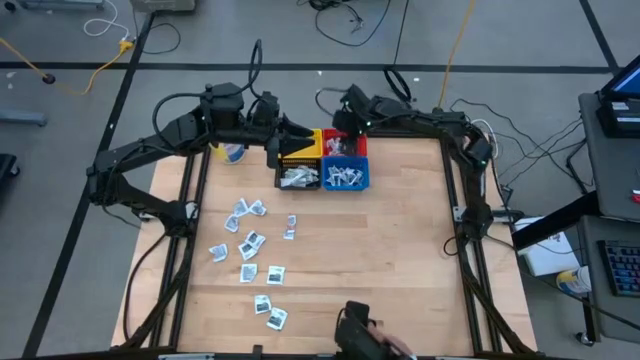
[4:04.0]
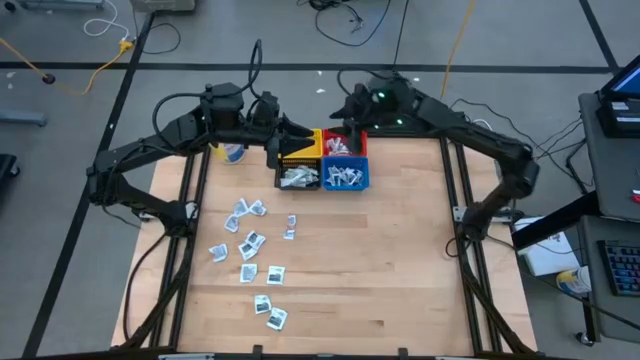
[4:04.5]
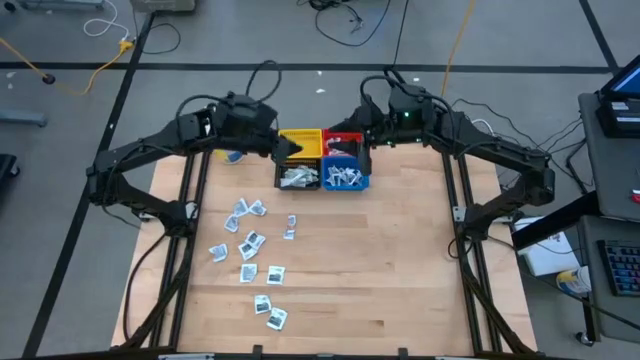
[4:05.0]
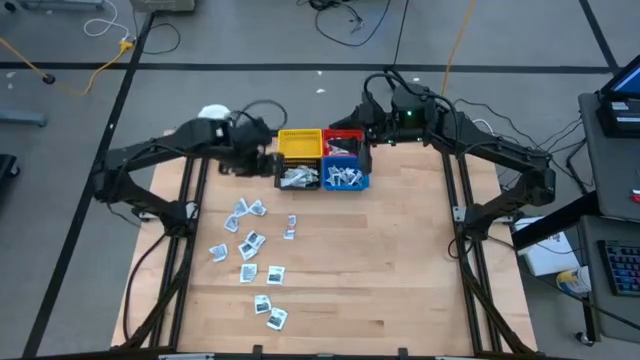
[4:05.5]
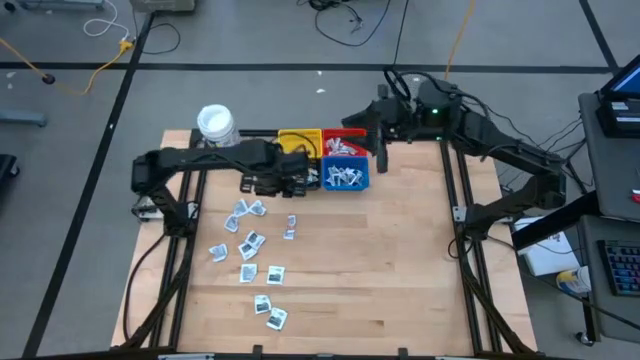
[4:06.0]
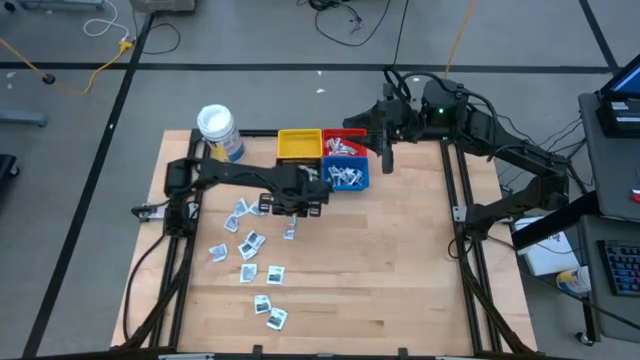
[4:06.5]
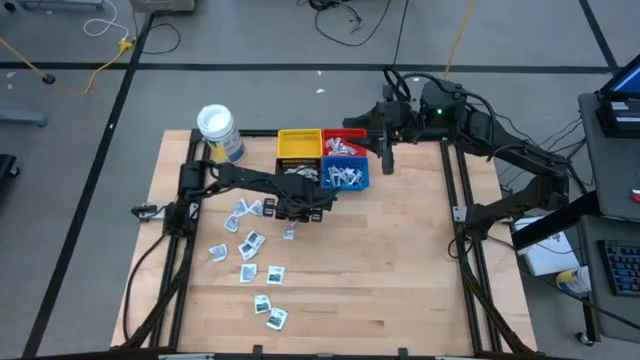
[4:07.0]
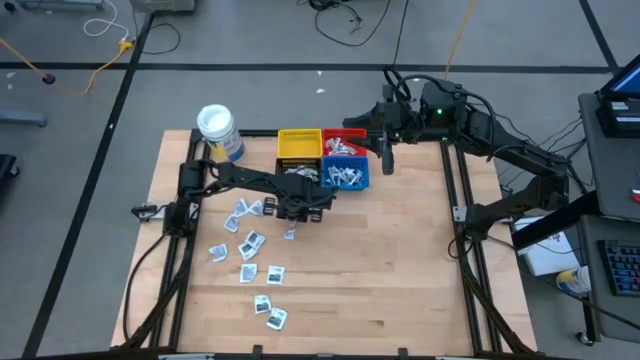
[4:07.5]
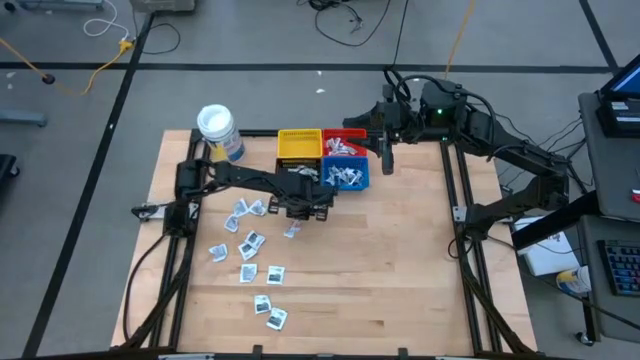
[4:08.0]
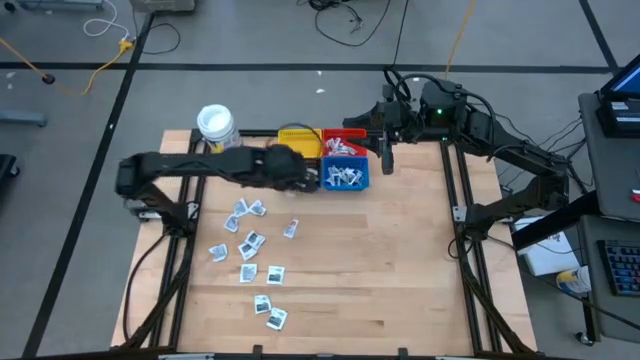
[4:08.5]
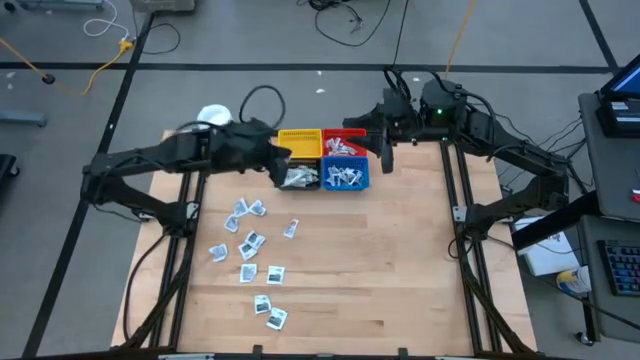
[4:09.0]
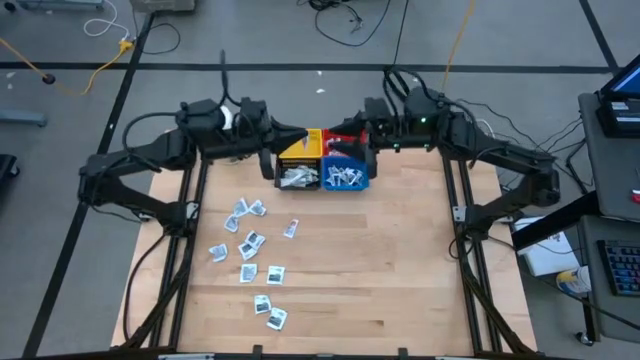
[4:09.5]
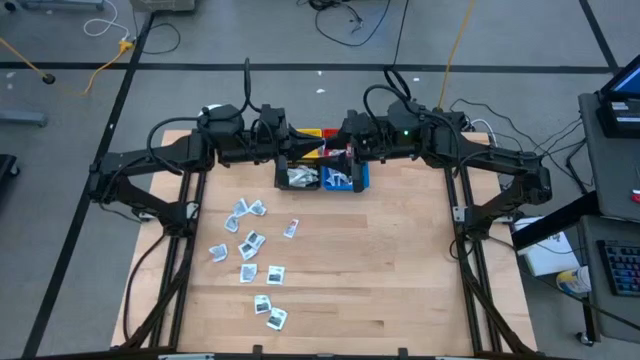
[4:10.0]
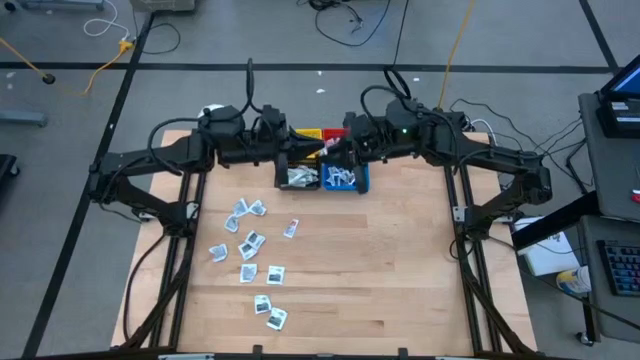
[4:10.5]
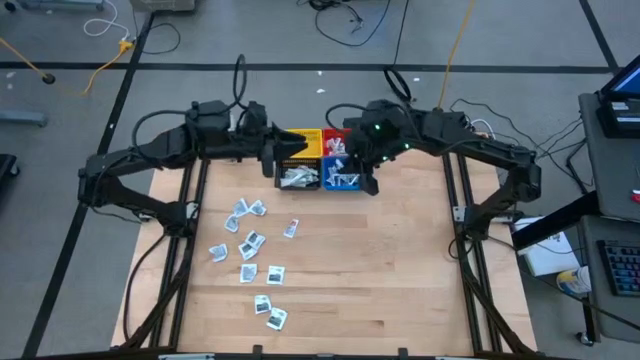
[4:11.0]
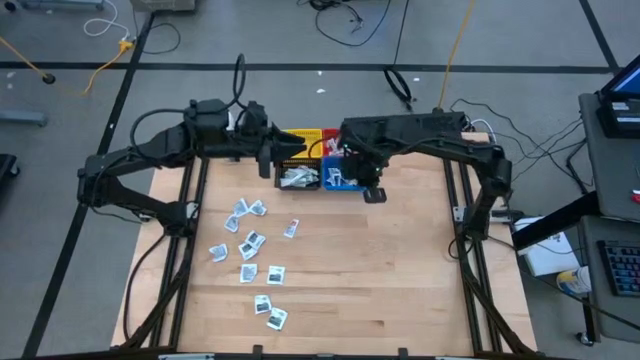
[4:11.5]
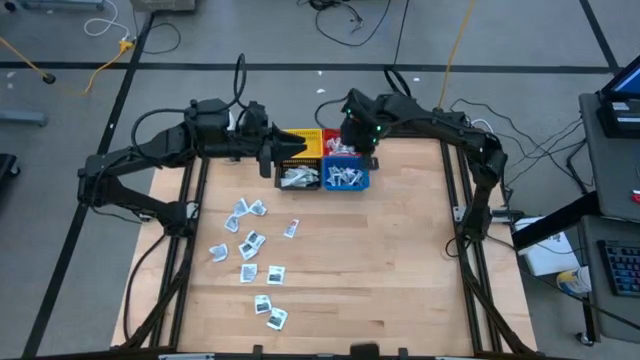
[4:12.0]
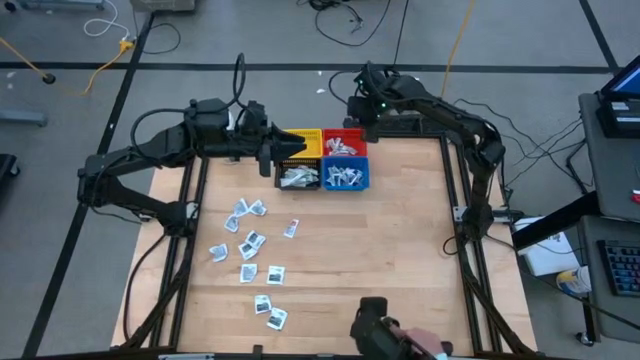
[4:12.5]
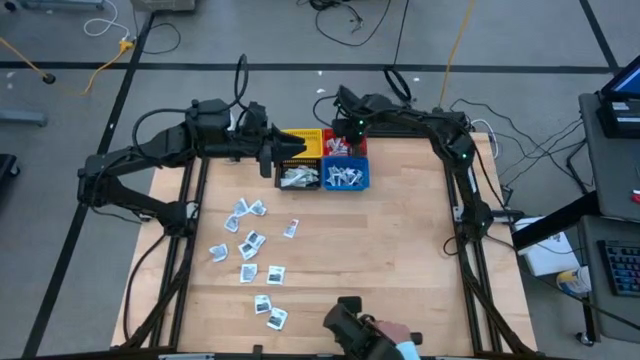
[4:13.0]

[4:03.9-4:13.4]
Task: Pick & Place First Aid Supplies
Put the orange ointment pack into the red basket

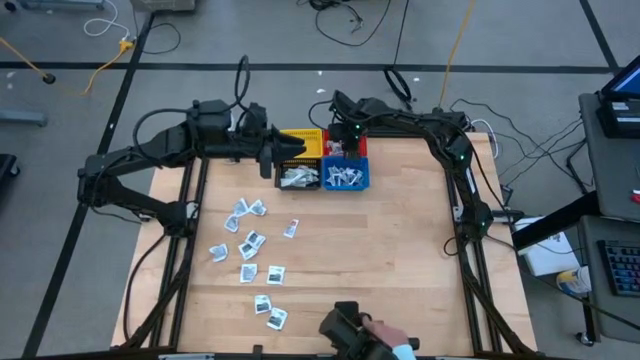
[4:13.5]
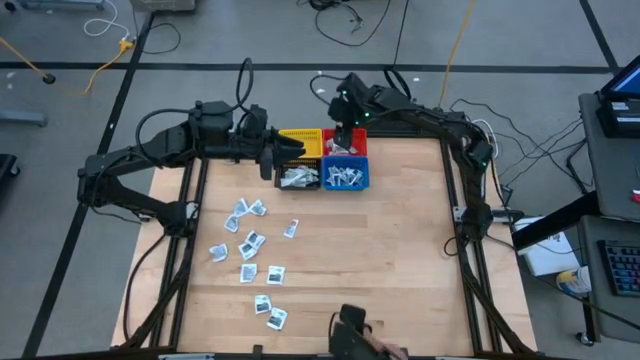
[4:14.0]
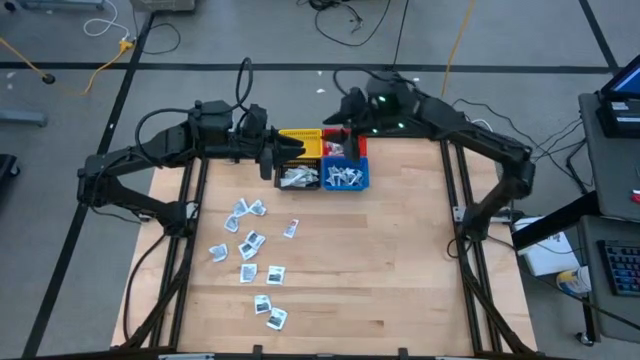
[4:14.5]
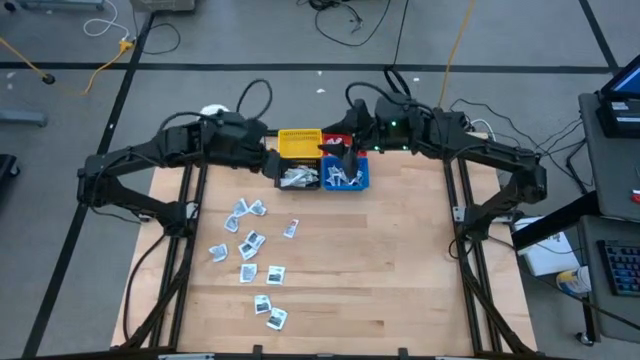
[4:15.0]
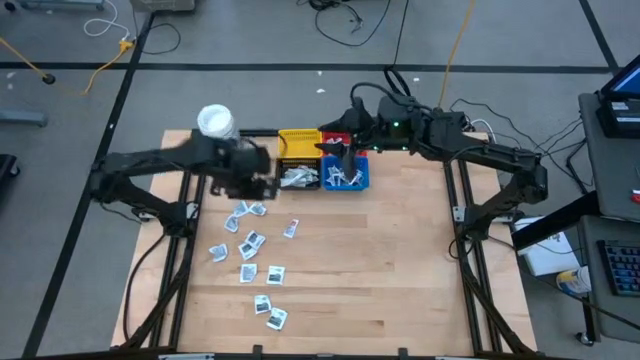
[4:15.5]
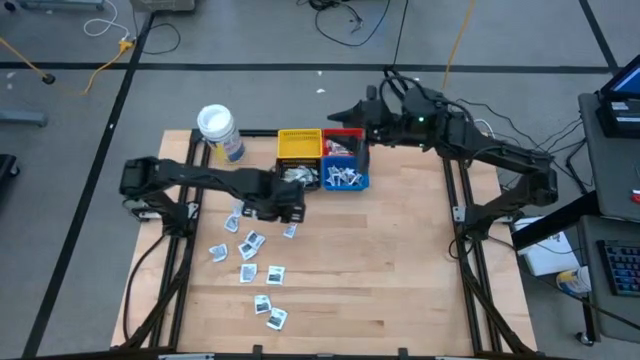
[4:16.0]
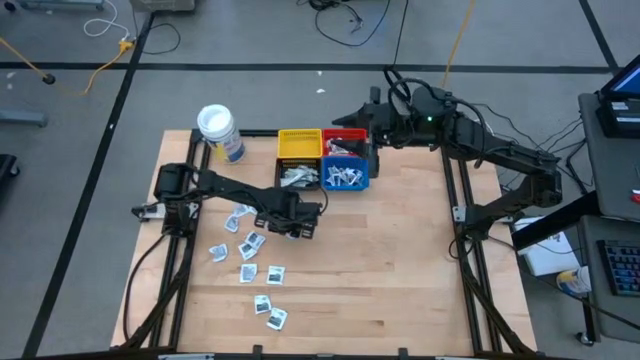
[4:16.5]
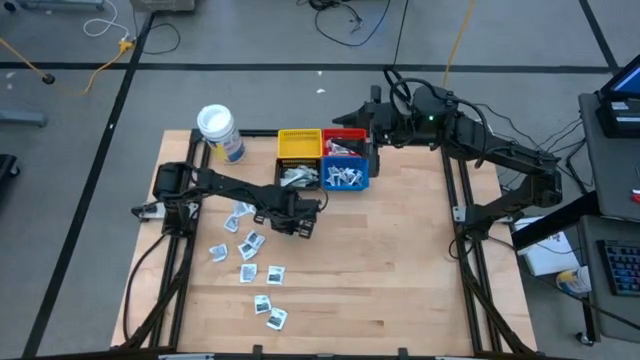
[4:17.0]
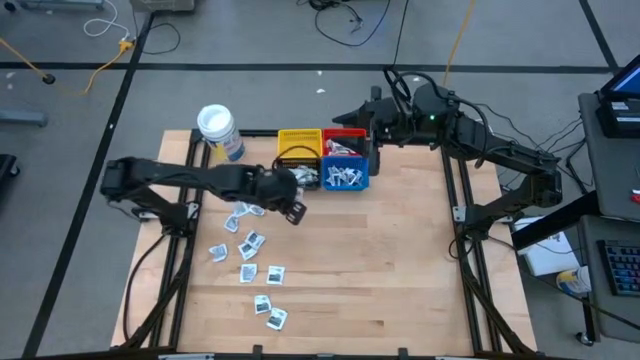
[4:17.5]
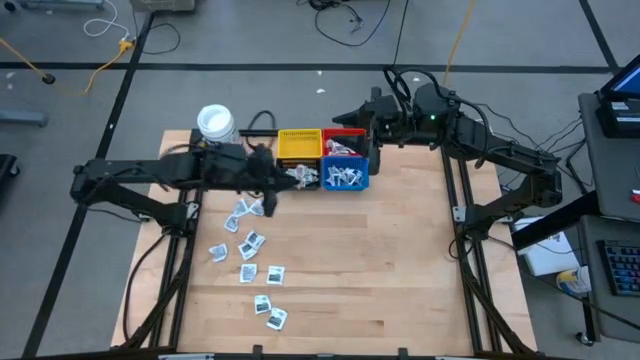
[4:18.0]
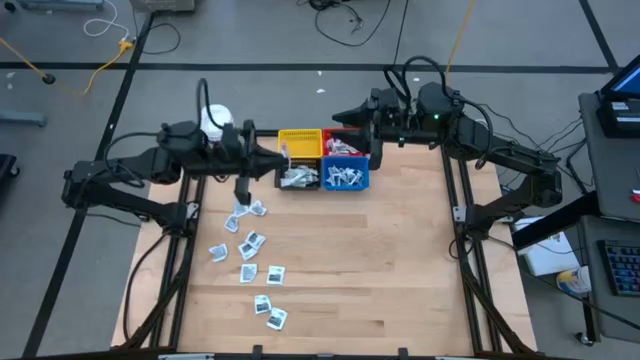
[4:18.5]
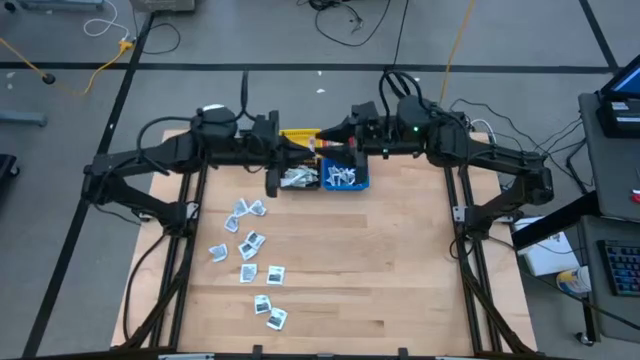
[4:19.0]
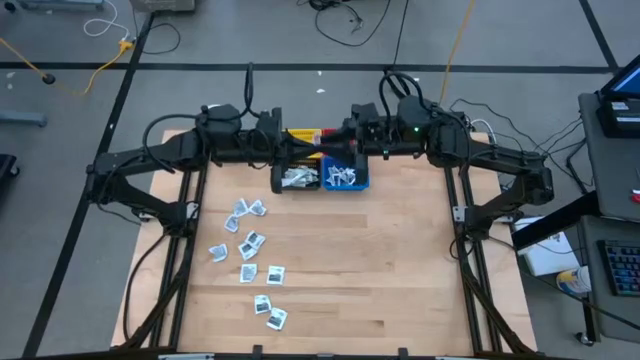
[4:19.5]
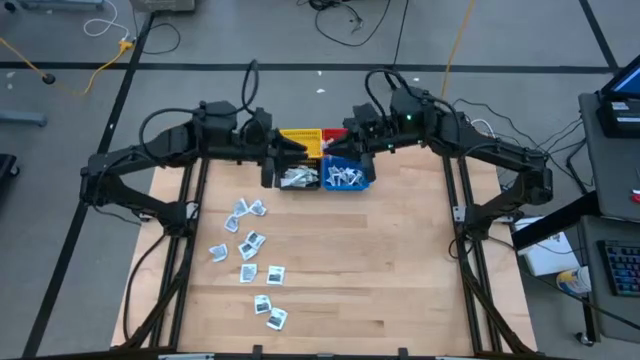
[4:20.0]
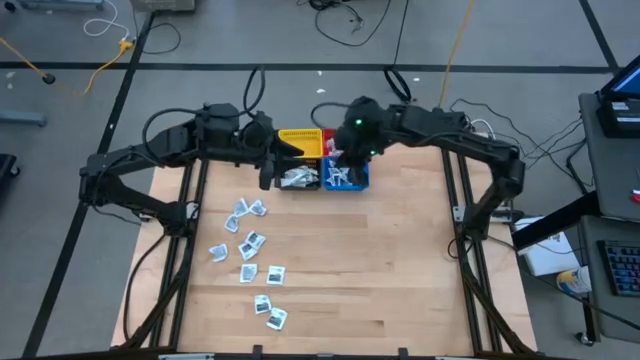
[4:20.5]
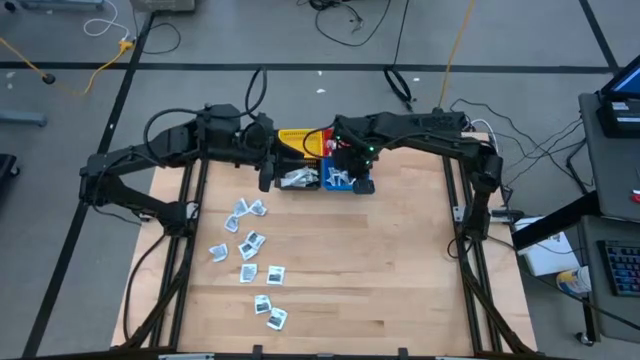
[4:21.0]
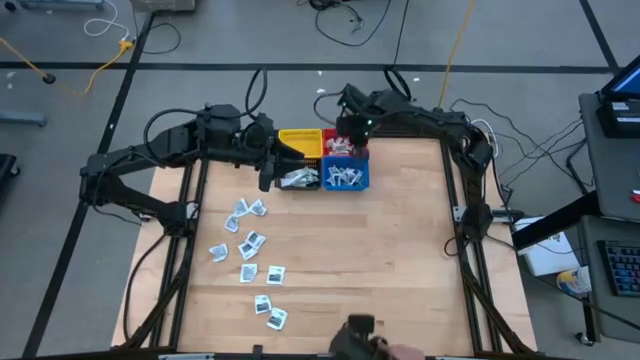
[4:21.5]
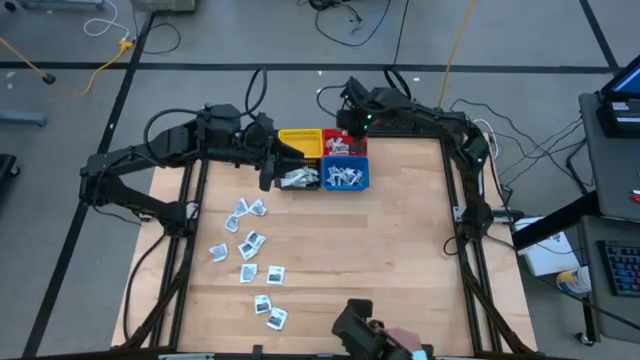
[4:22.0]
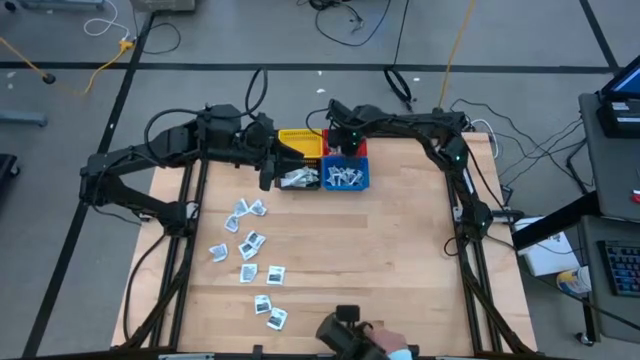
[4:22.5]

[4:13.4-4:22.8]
Put the orange ointment pack into the red basket

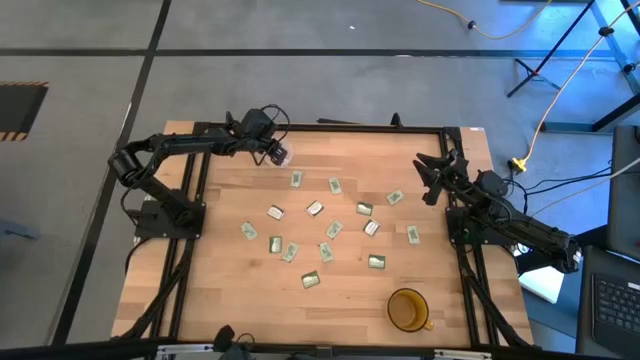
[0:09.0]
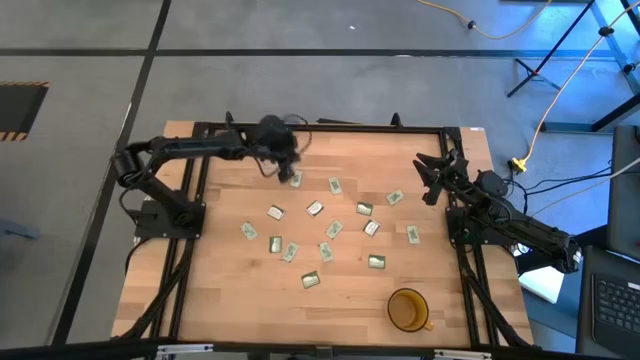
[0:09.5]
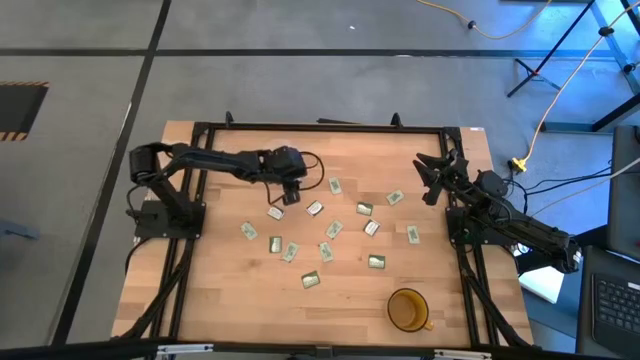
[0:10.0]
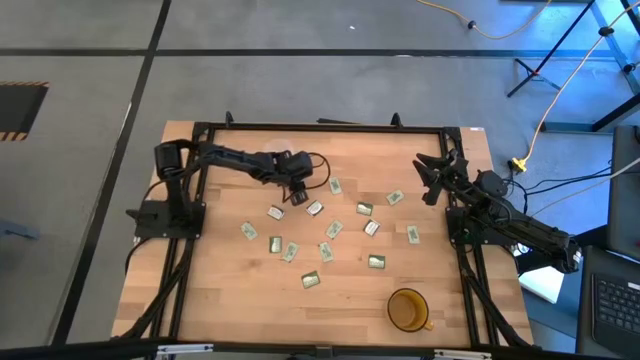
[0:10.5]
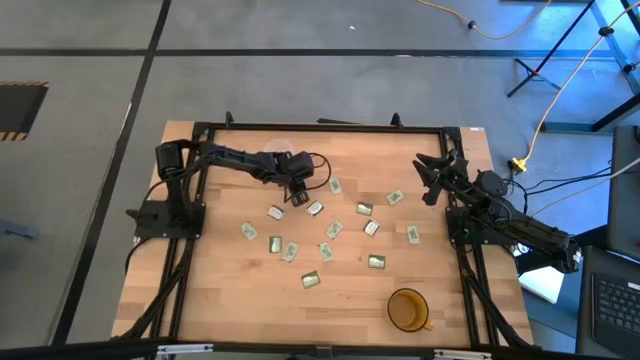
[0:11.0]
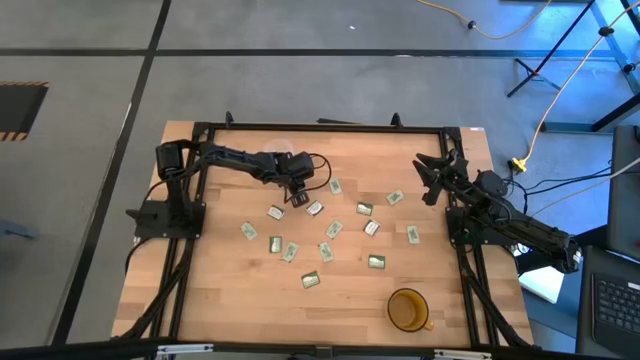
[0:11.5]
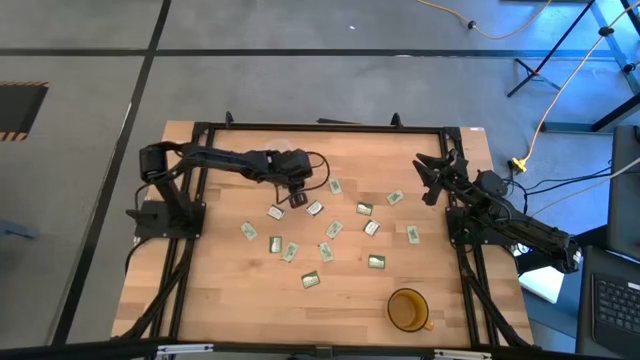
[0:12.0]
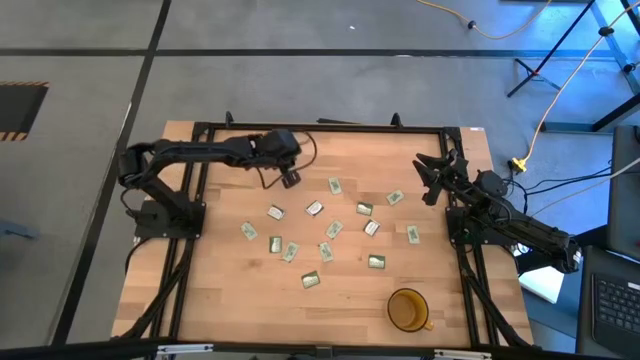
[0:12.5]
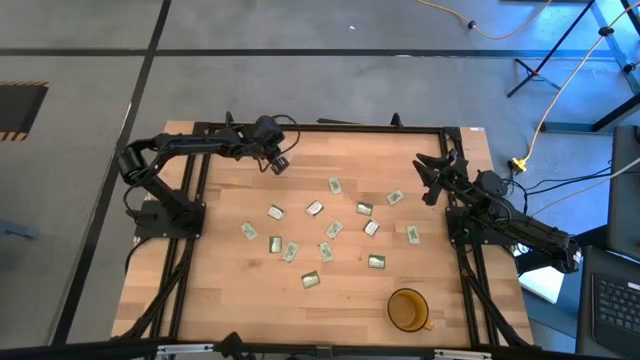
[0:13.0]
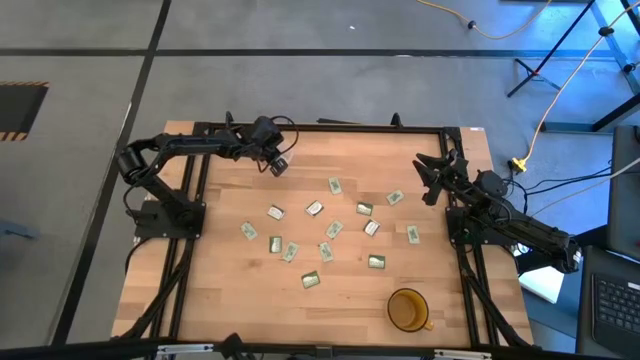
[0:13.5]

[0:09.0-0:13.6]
Task: Pick and place Stevia / Truvia into bins
Put the stevia packet into the transparent container
